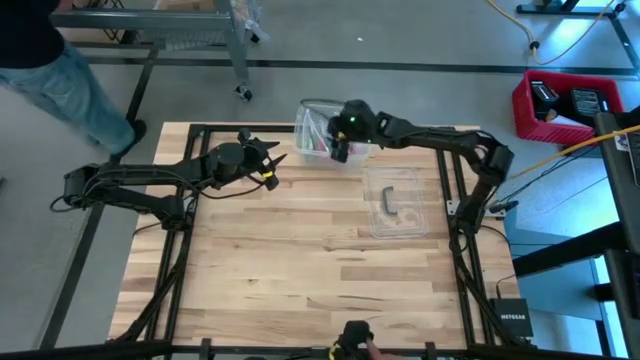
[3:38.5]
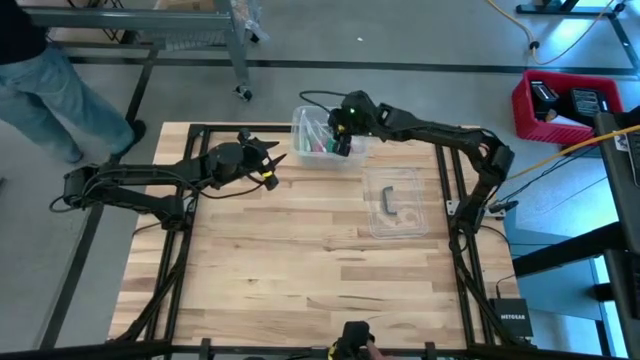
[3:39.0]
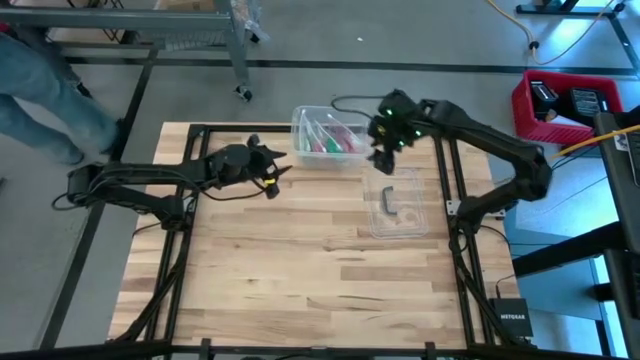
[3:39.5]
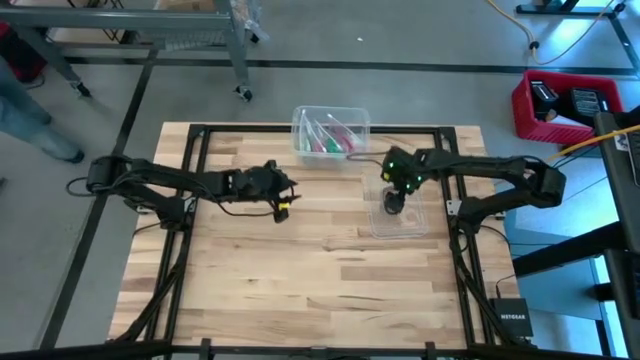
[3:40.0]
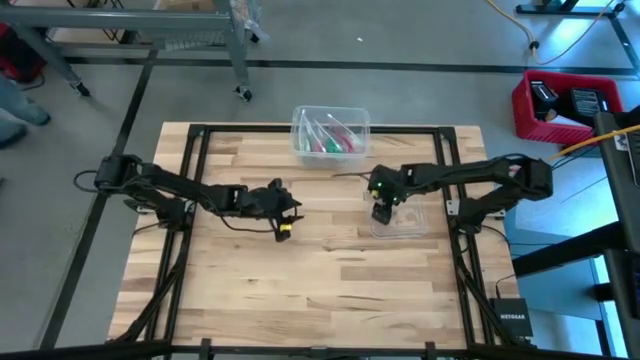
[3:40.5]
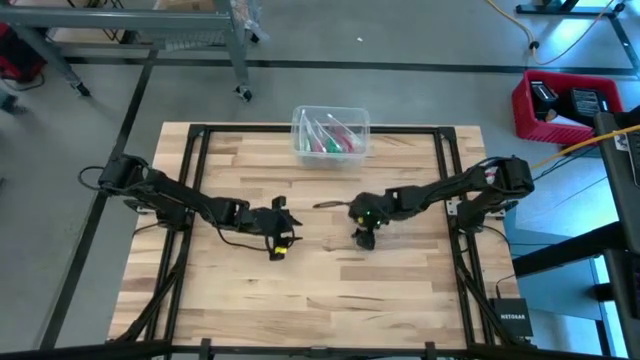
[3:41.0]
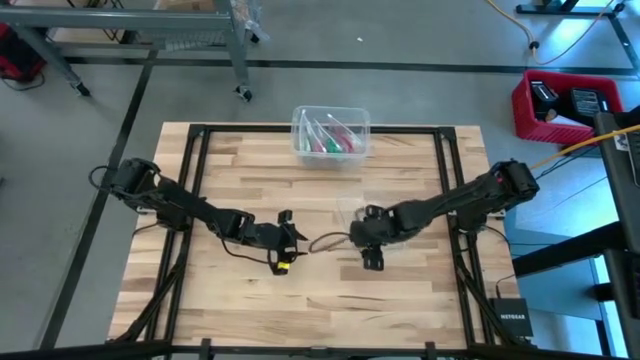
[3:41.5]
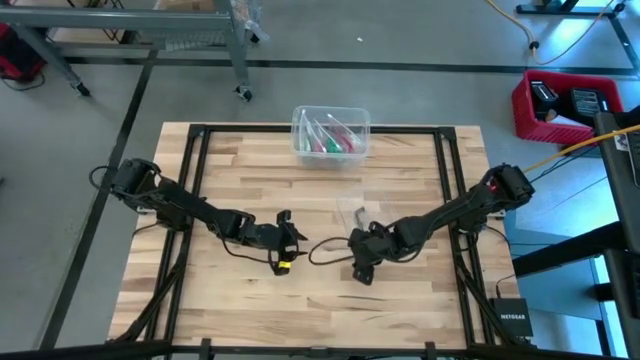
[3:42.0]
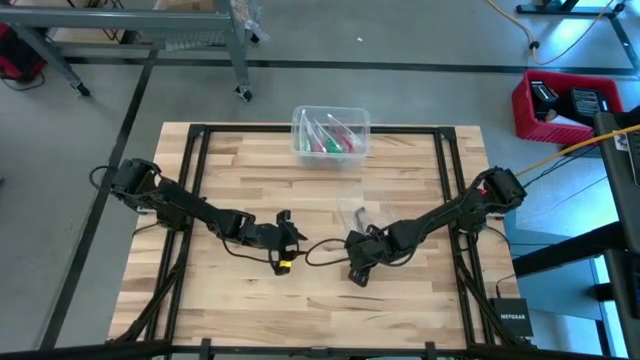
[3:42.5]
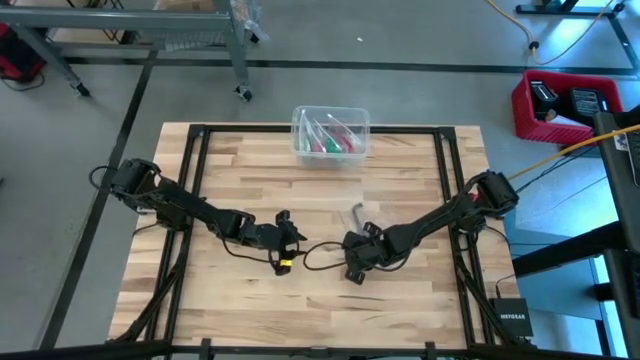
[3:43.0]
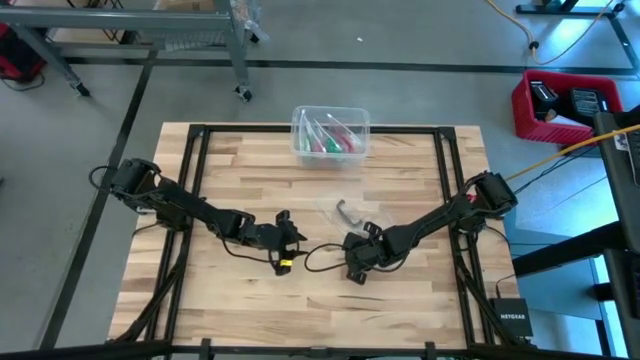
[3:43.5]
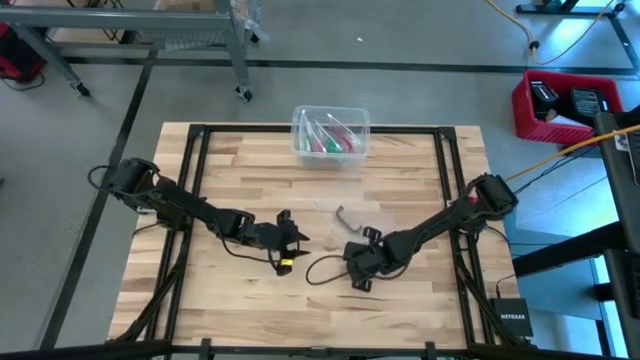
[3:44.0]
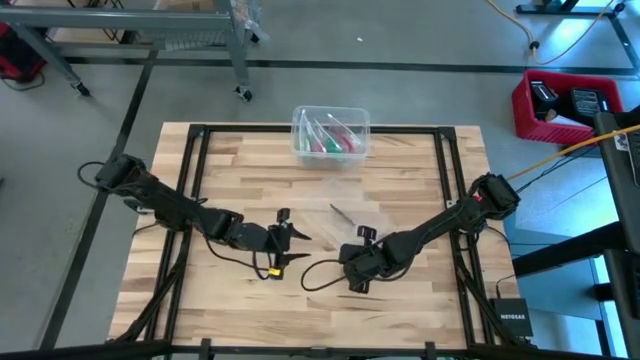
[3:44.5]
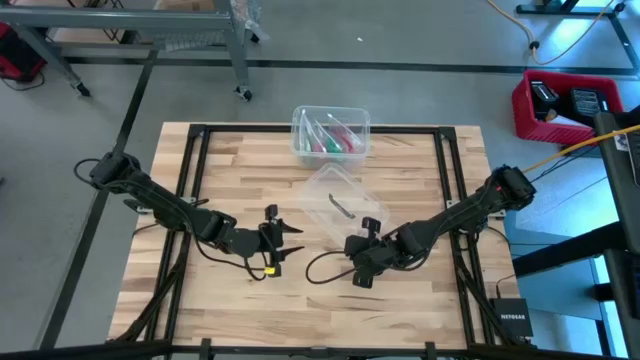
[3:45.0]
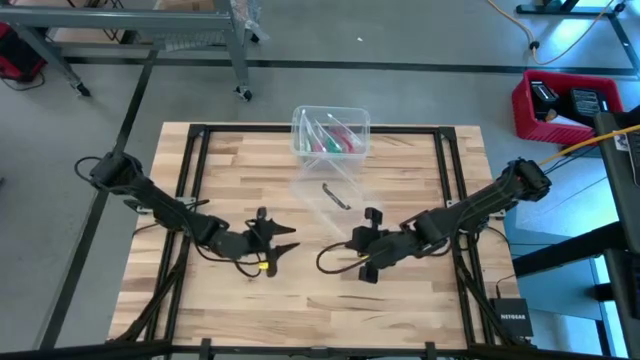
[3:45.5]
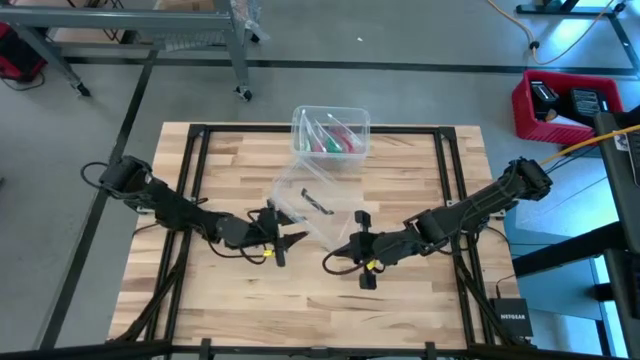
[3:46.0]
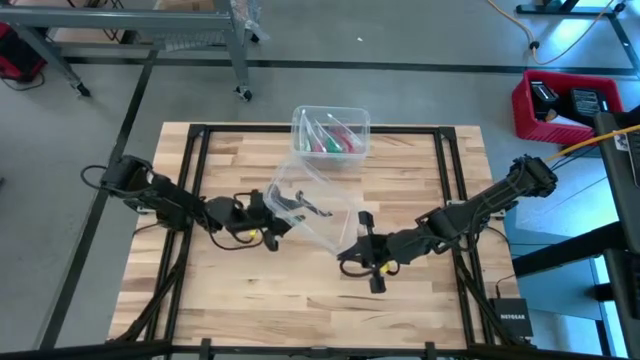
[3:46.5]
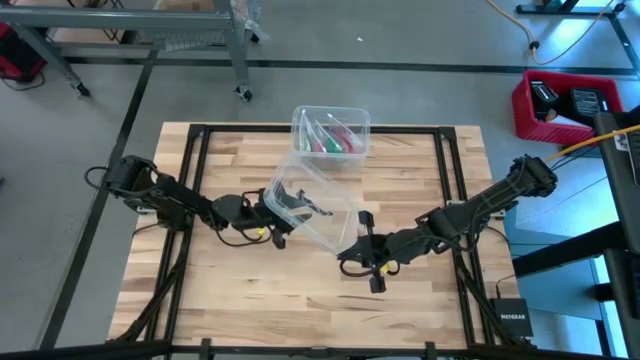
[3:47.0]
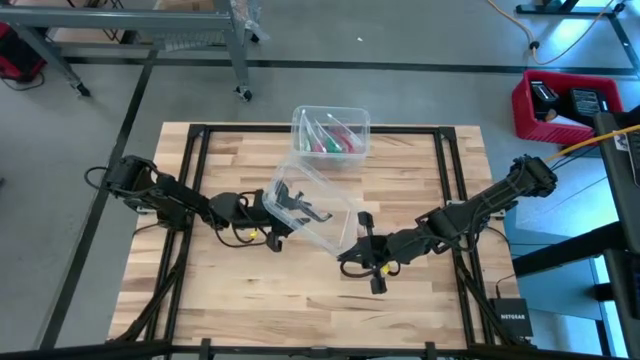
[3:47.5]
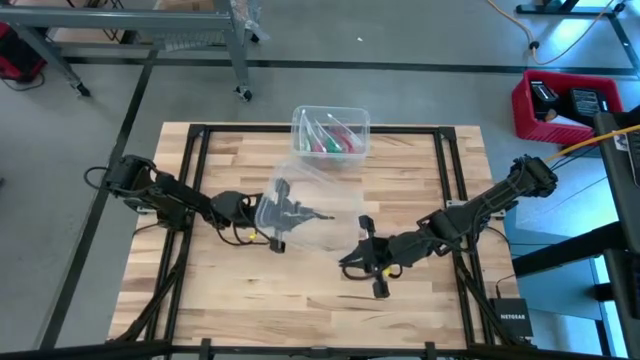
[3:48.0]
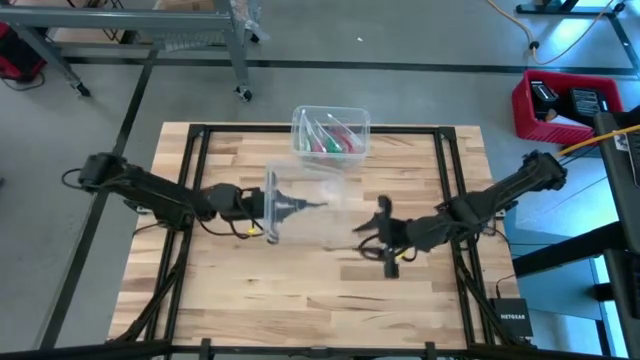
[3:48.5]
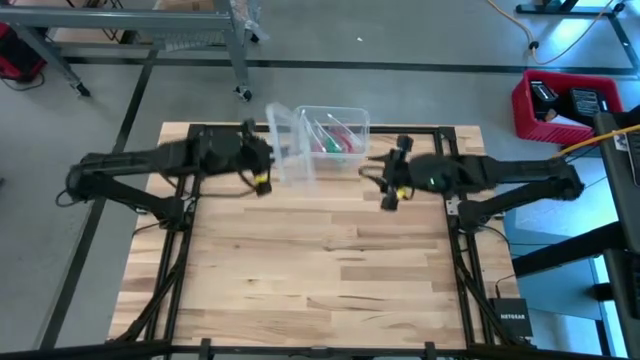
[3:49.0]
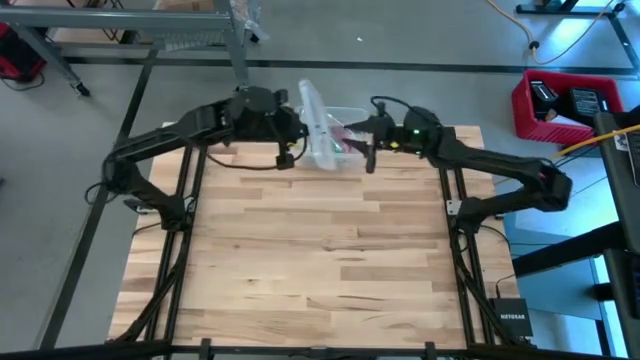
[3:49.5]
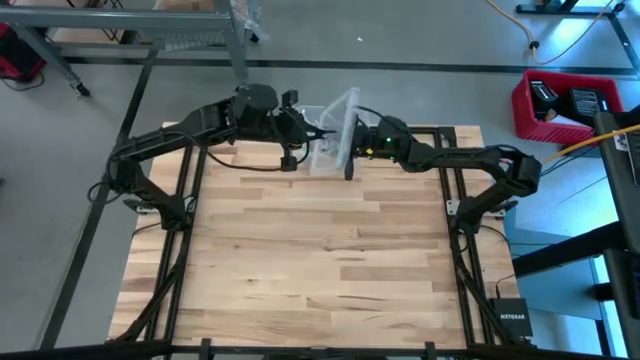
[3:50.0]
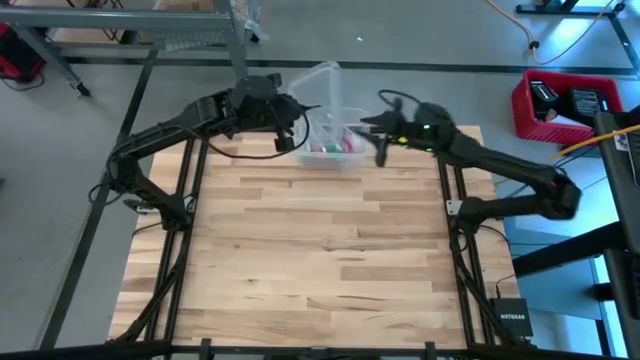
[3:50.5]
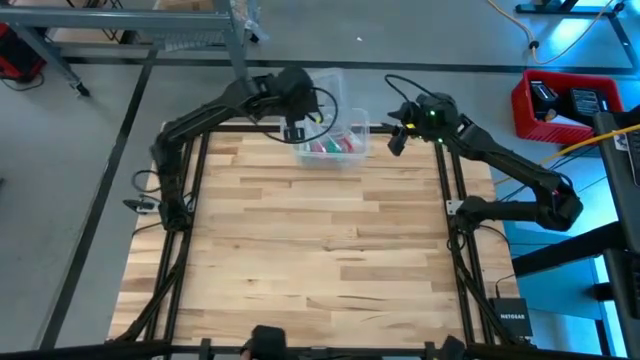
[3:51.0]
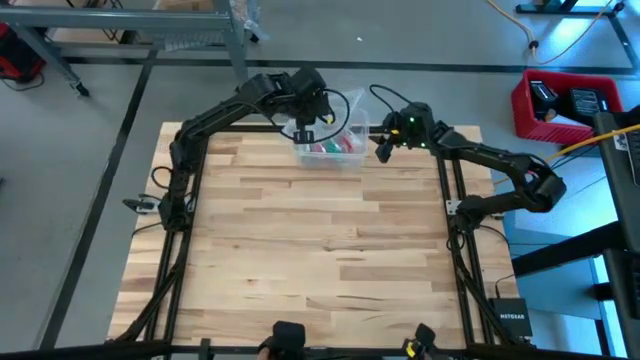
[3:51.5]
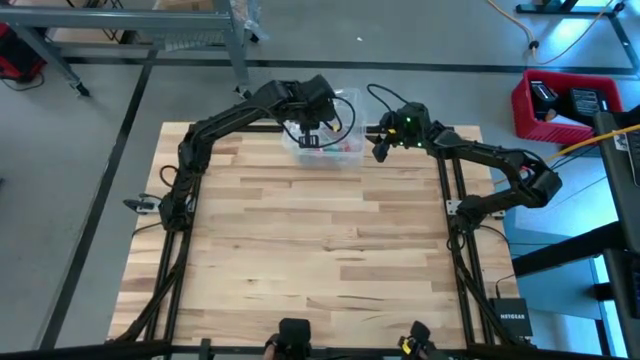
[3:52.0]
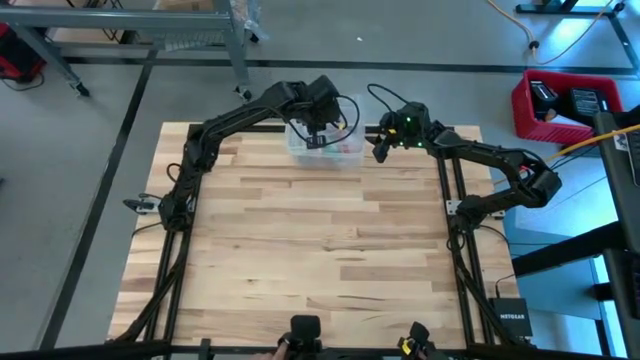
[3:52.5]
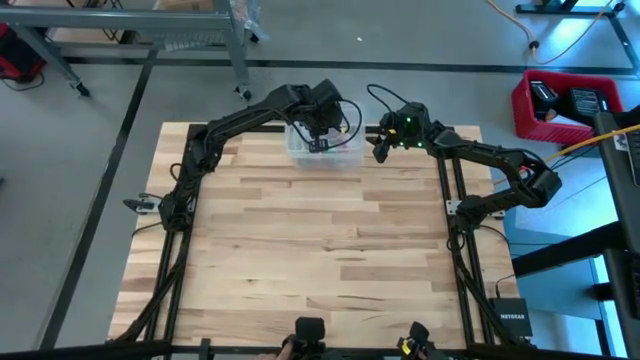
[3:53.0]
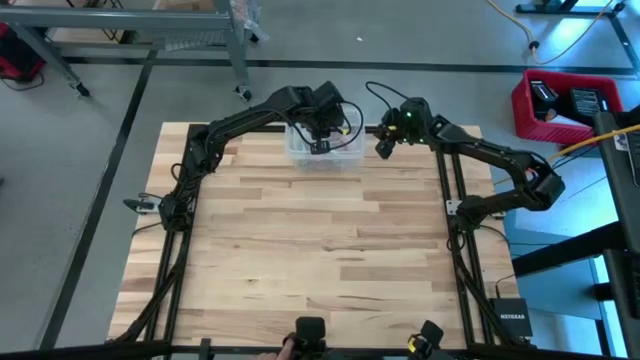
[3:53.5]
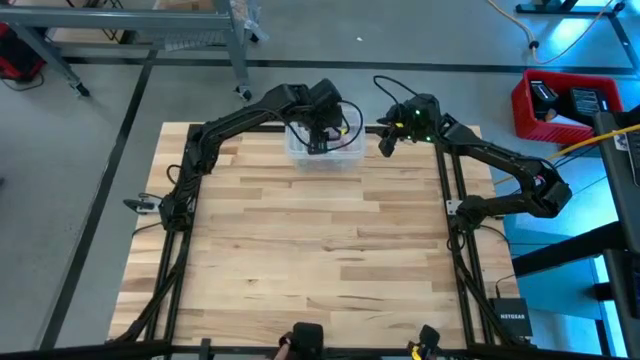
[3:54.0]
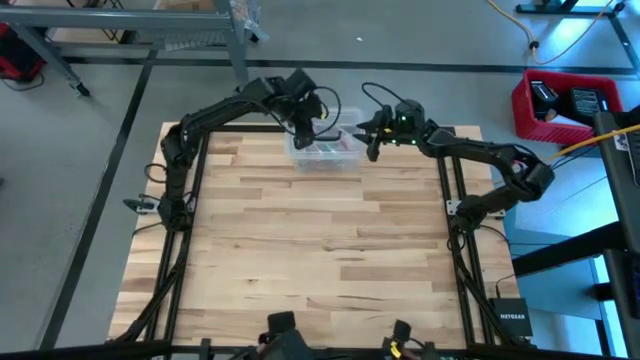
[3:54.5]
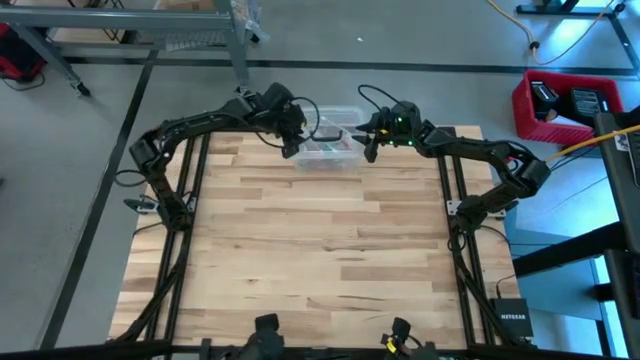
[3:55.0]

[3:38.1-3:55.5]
Task: Roll bandage
Close the transparent container

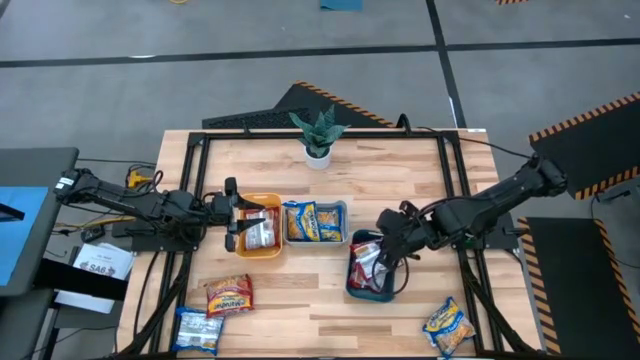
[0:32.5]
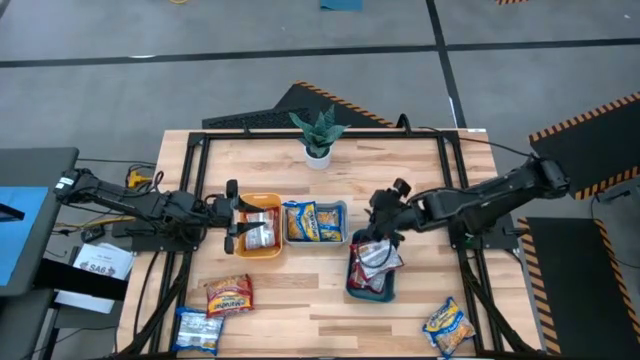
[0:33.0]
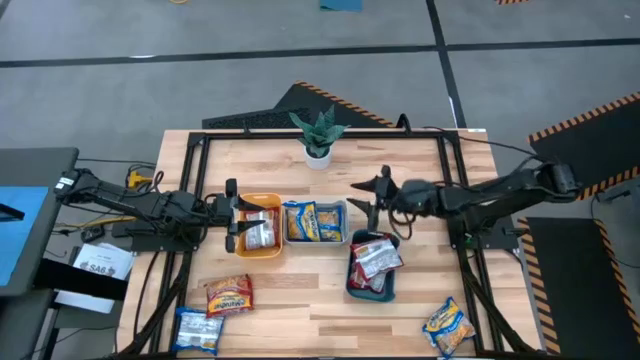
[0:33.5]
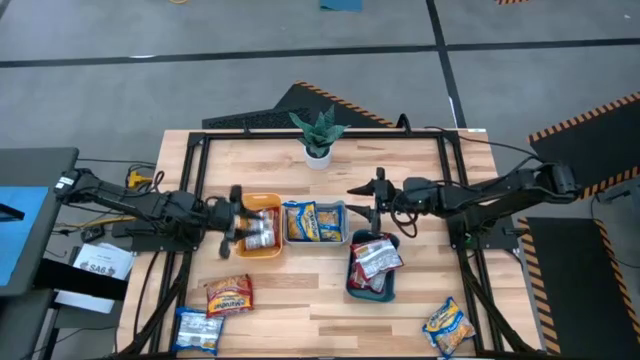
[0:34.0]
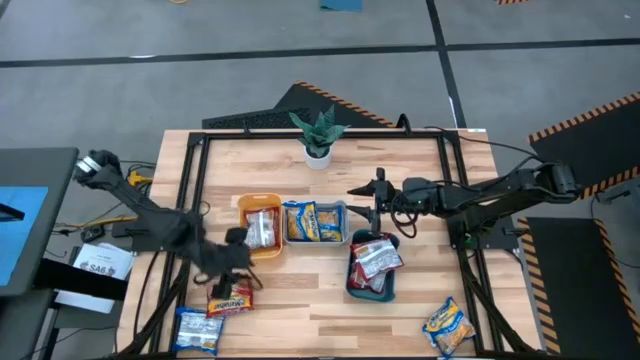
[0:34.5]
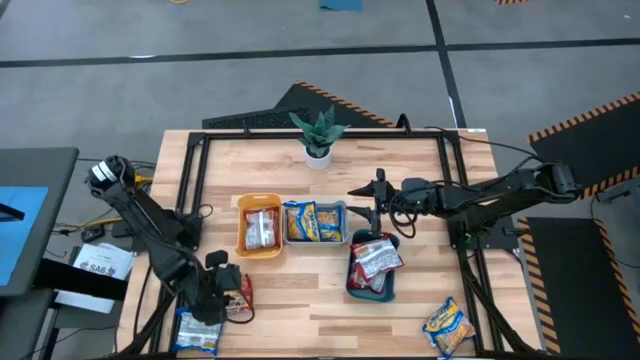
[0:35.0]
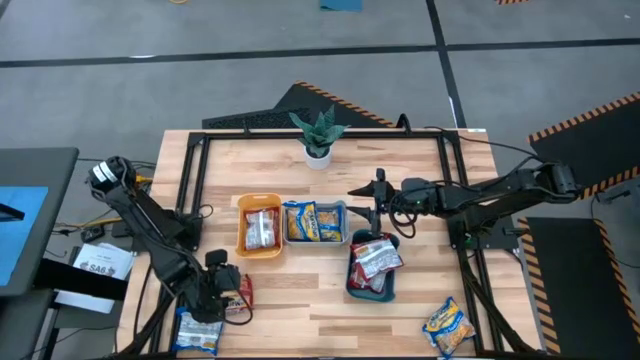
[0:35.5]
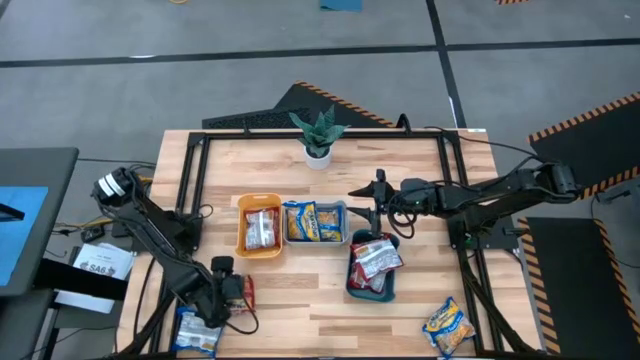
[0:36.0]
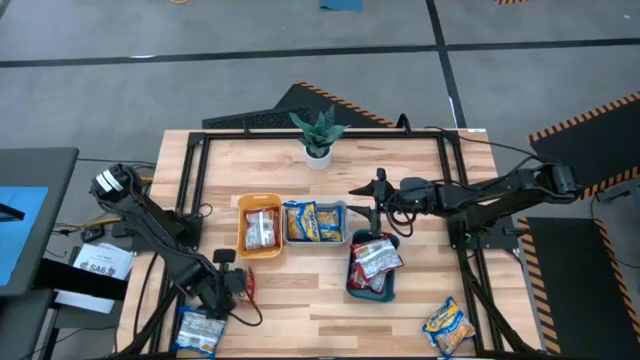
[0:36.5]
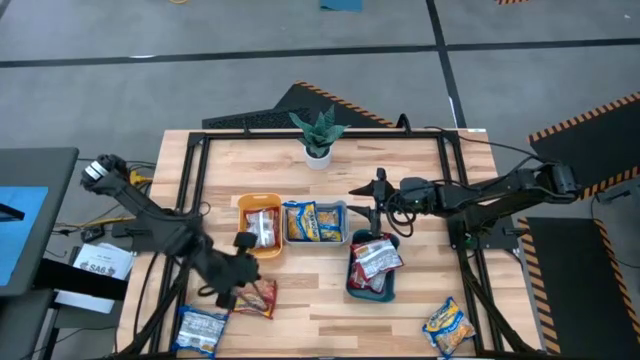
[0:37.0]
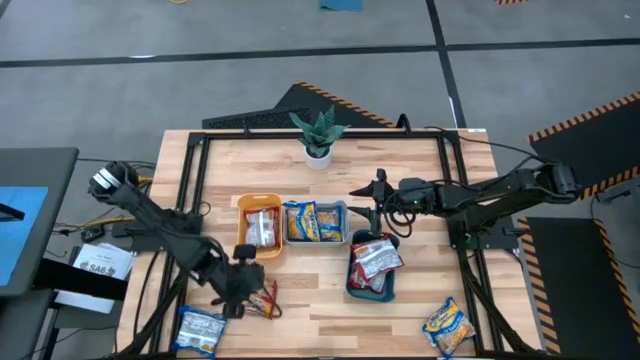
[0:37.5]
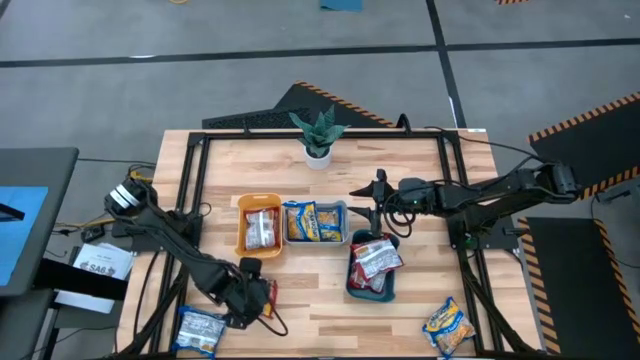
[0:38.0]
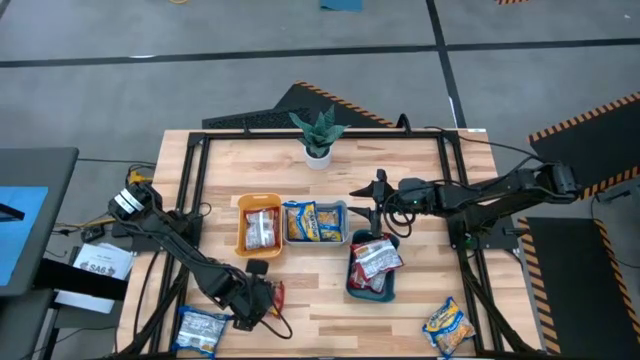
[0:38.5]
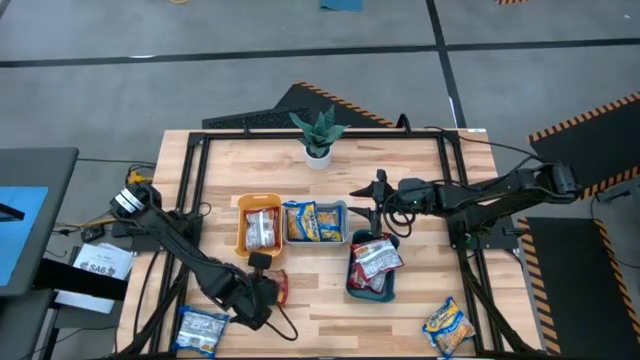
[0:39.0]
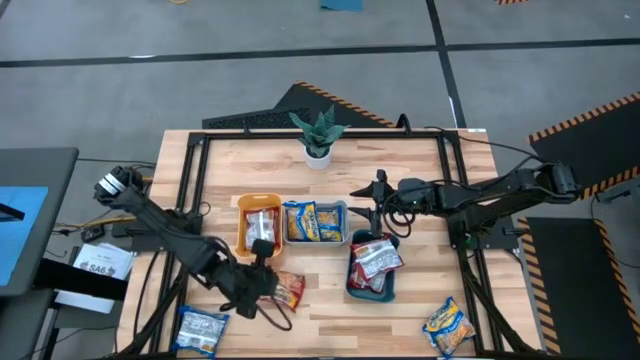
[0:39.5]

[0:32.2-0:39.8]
Task: Sort Maruchan noodles
Put the red noodle pack into the blue bin
